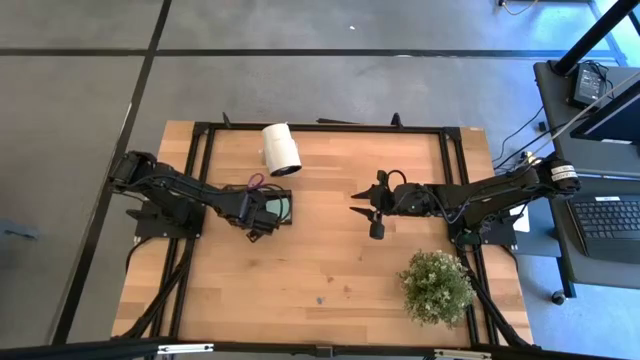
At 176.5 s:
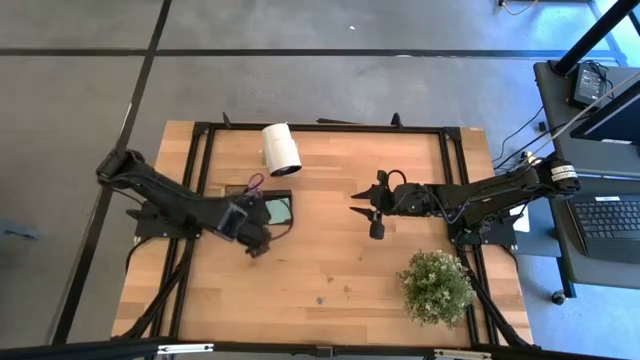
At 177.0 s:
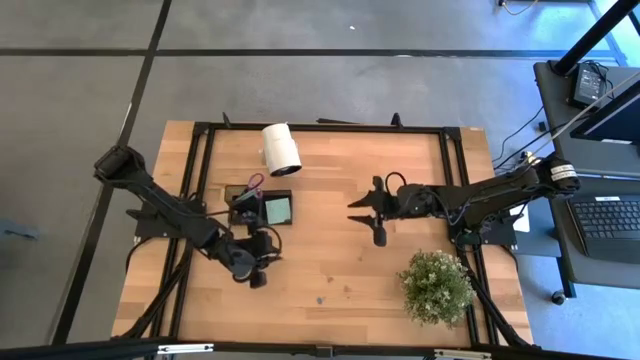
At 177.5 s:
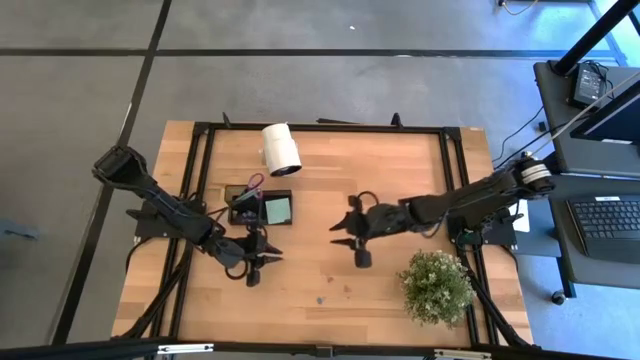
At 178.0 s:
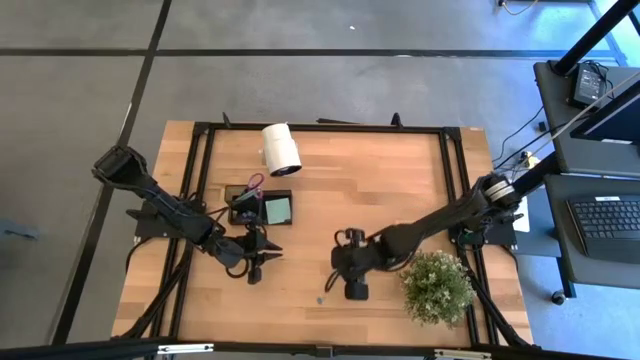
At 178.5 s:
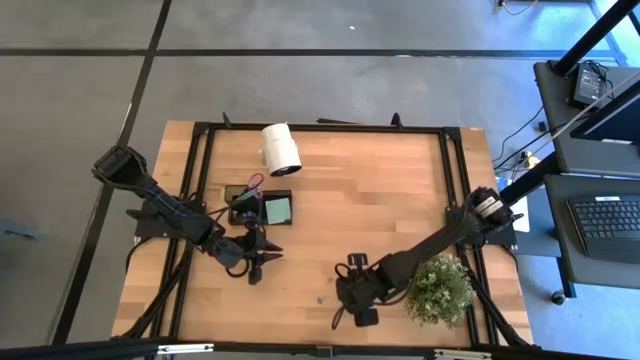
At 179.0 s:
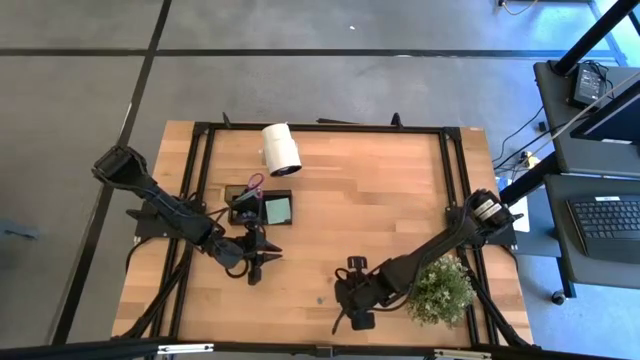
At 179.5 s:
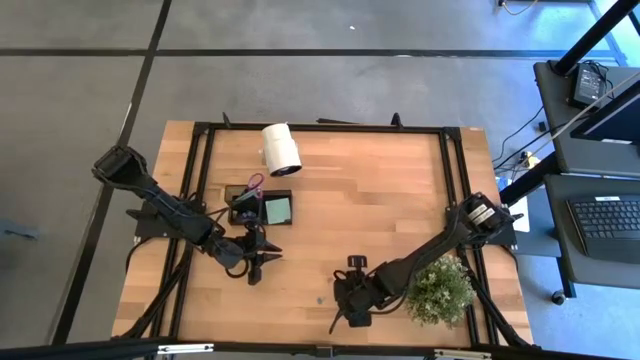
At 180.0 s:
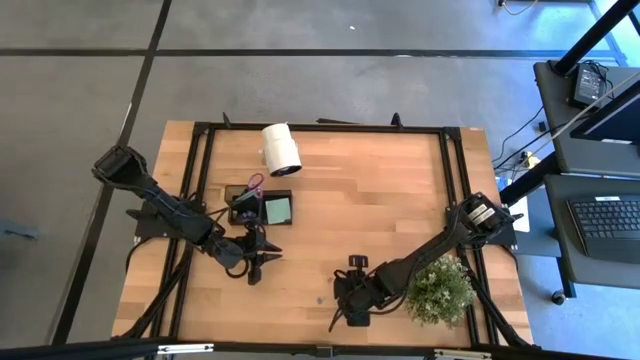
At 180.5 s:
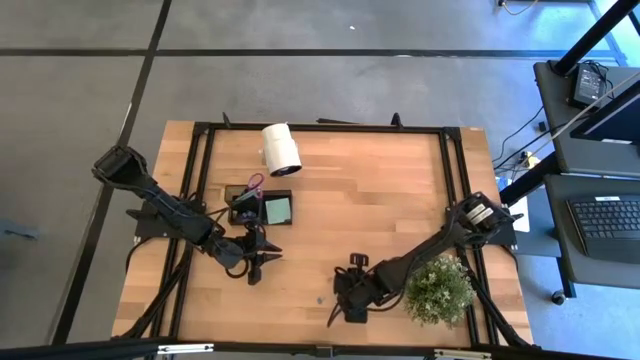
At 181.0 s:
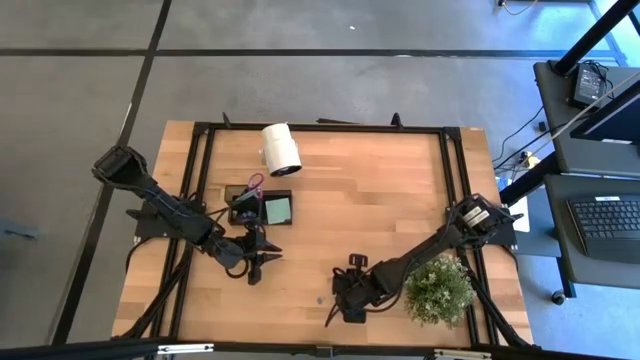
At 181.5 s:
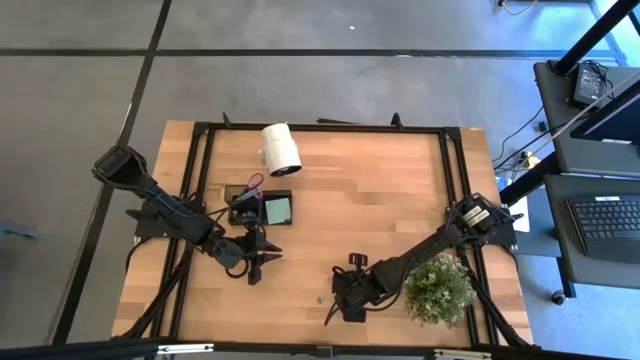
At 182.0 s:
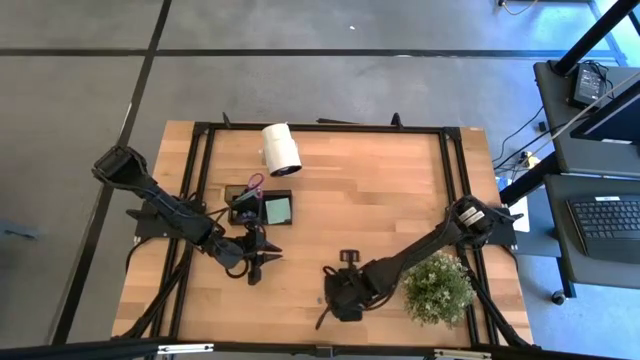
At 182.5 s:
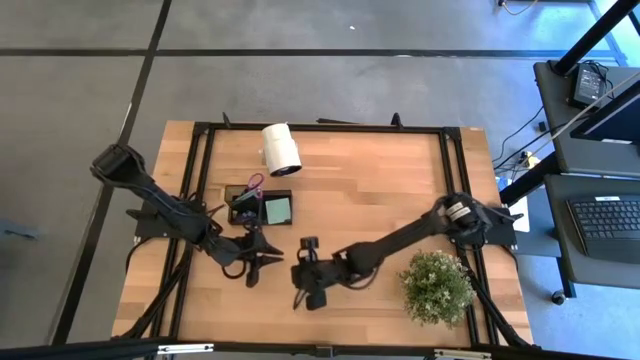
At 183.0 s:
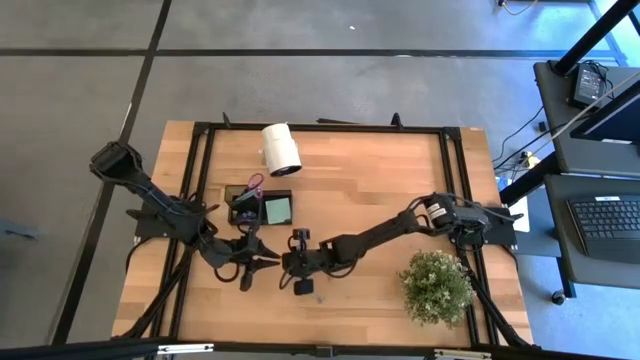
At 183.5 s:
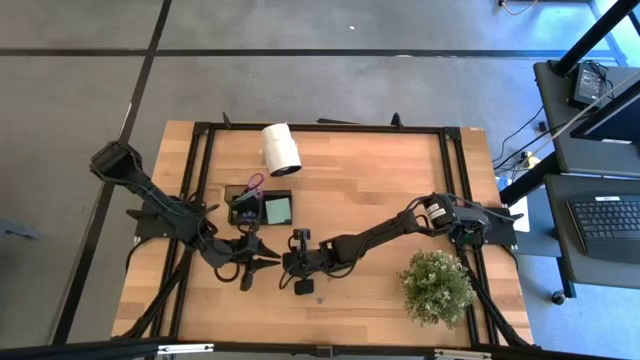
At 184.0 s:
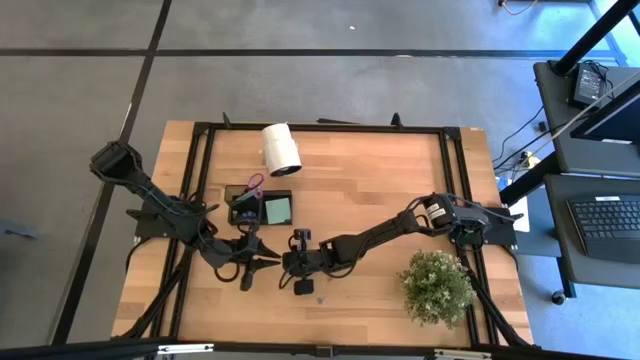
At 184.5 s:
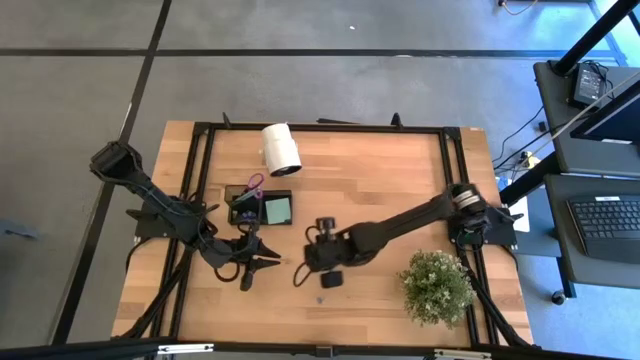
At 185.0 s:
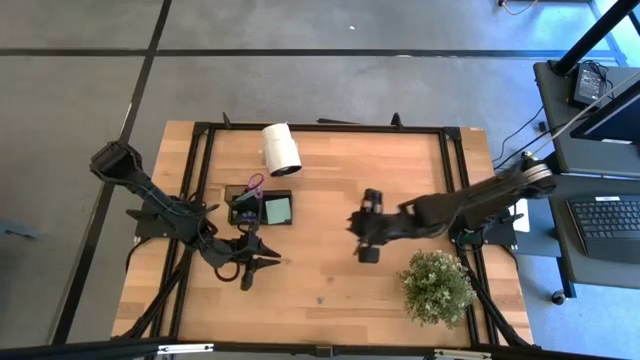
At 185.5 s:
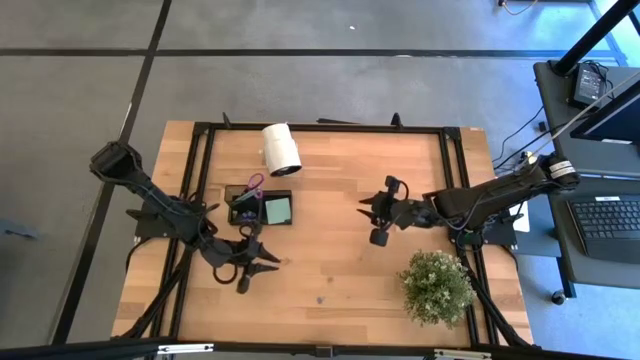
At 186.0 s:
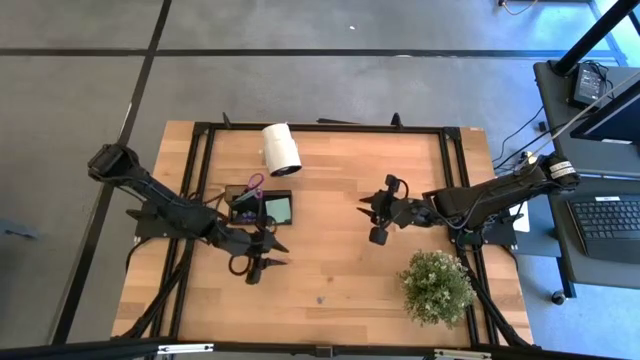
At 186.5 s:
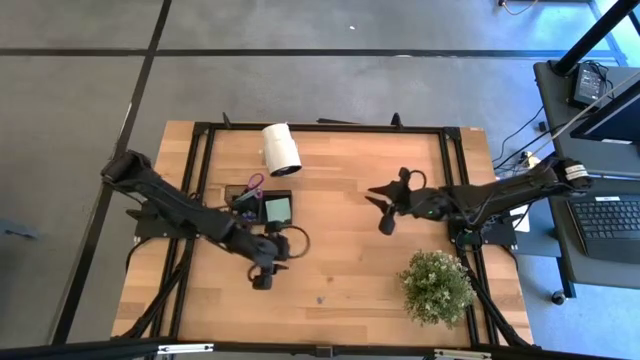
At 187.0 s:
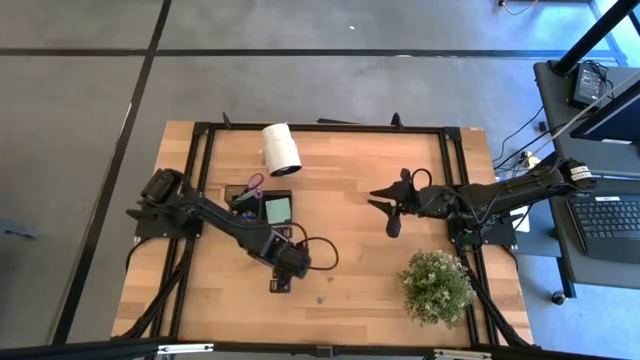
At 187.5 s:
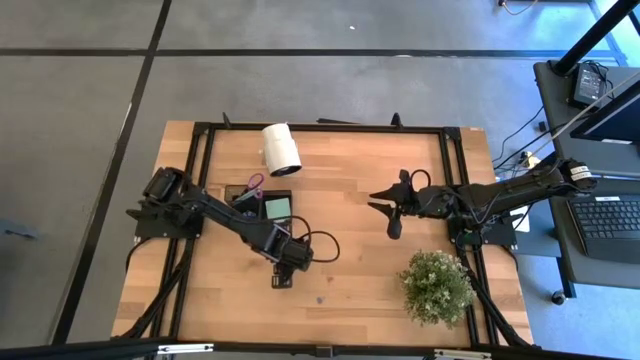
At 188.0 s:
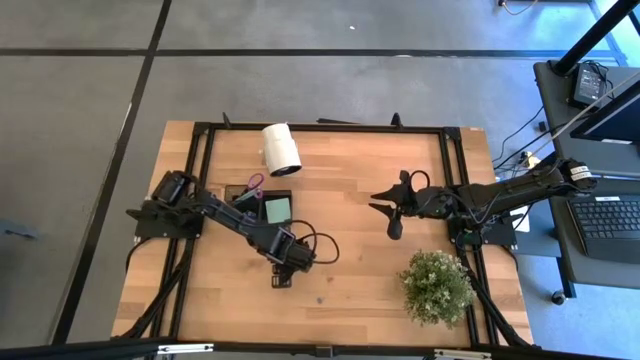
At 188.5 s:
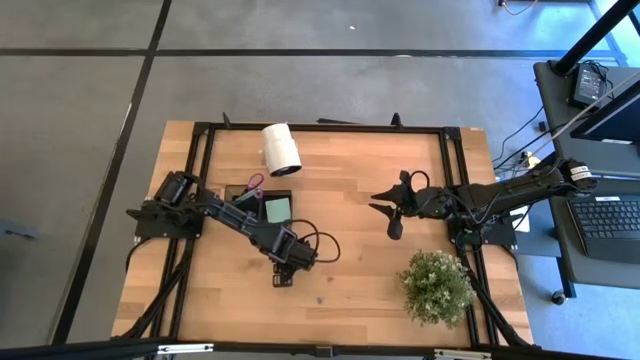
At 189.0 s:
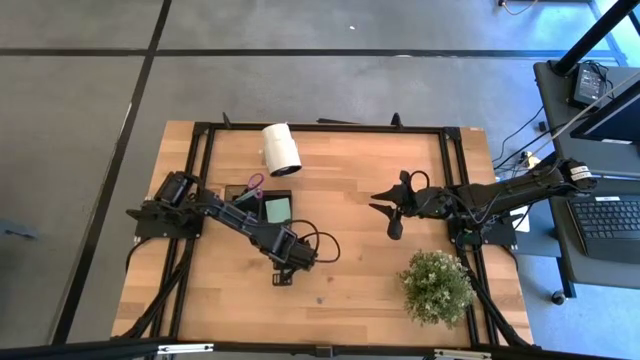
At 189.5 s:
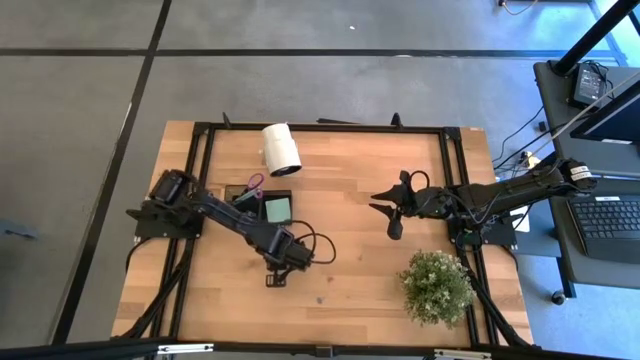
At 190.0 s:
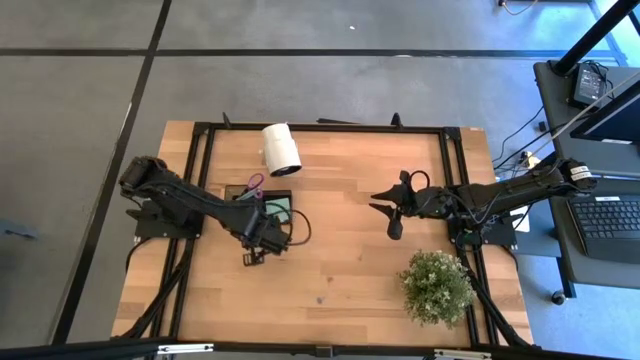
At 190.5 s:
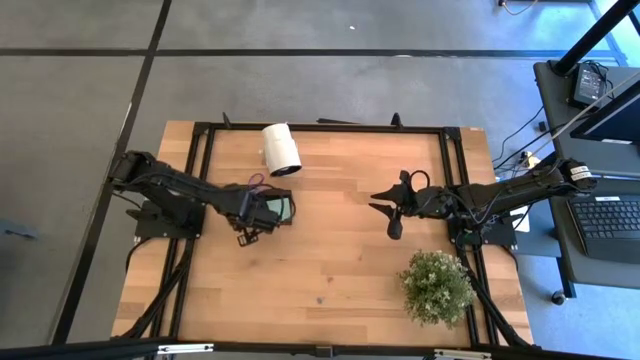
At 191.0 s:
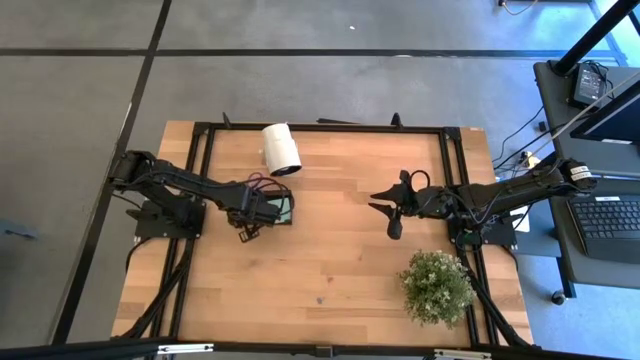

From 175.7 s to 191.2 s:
Task: Pick and place office supplies into organizer
Put the pink binder clip into the black desk organizer

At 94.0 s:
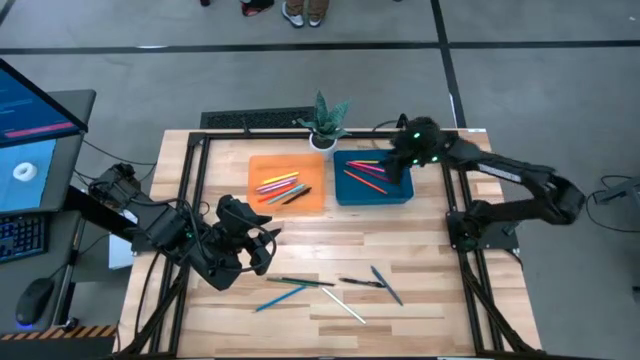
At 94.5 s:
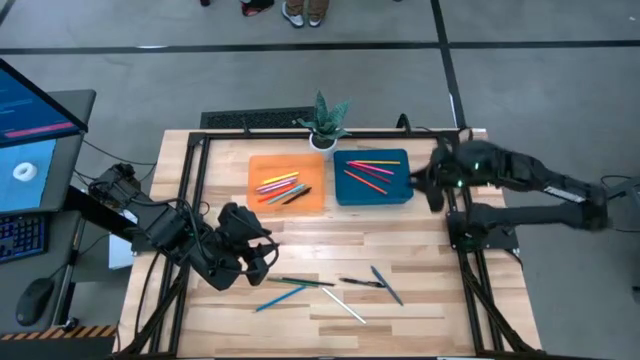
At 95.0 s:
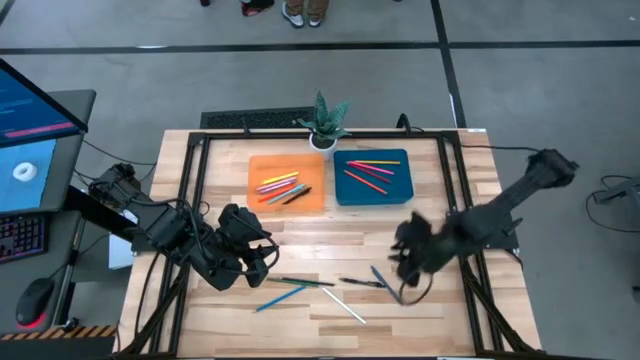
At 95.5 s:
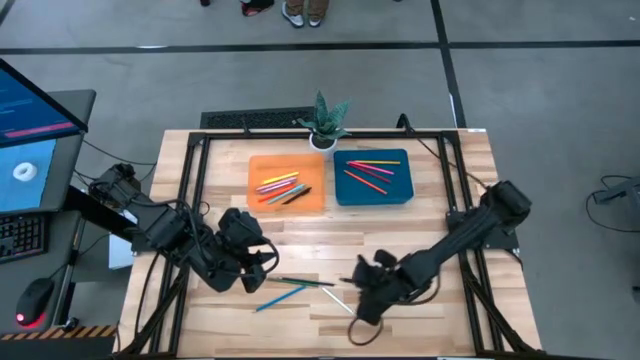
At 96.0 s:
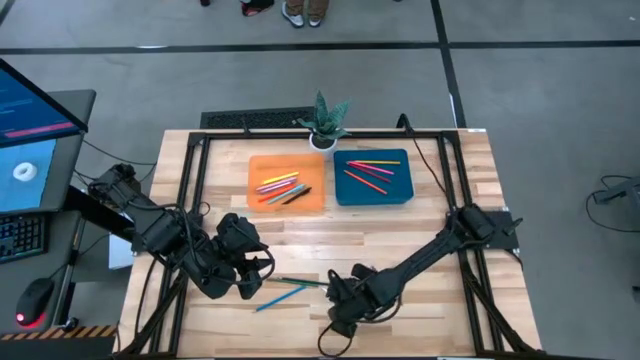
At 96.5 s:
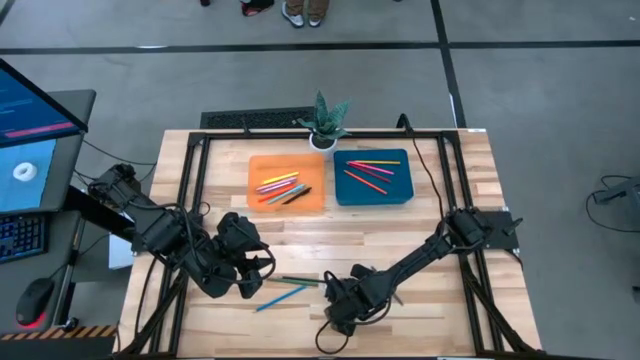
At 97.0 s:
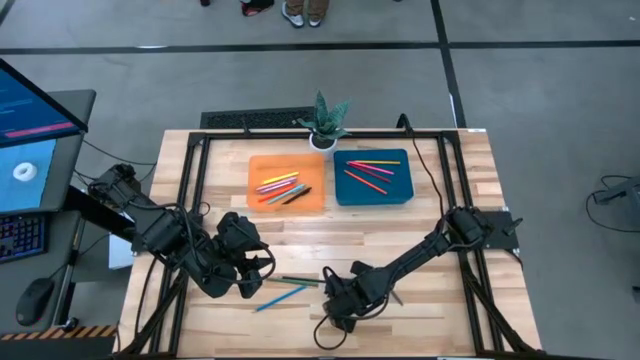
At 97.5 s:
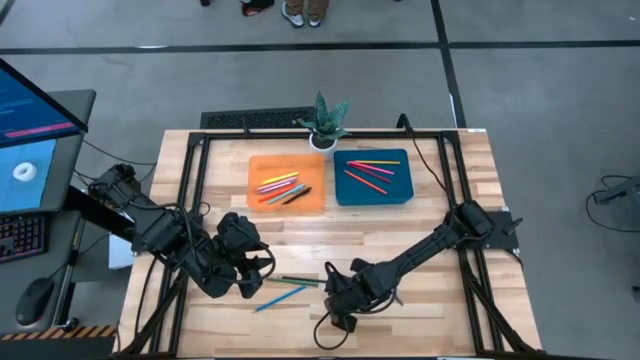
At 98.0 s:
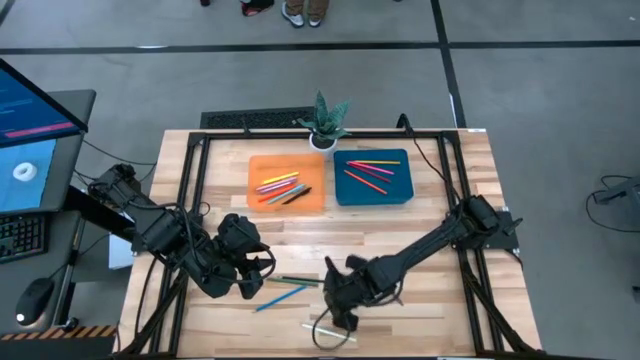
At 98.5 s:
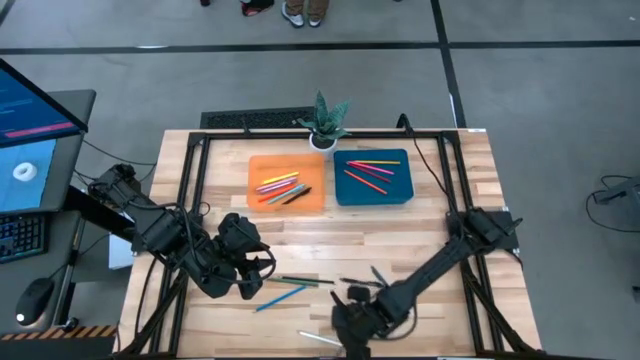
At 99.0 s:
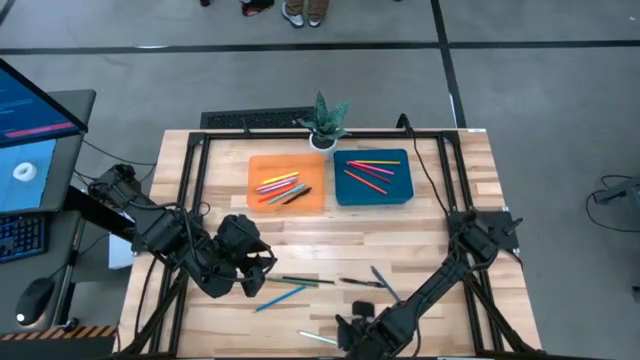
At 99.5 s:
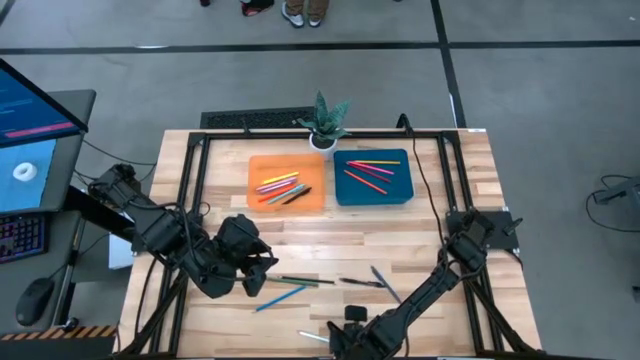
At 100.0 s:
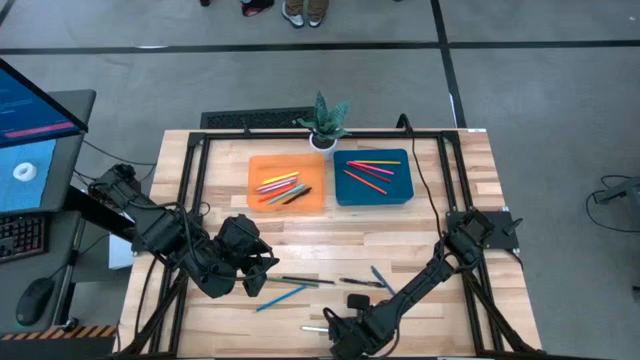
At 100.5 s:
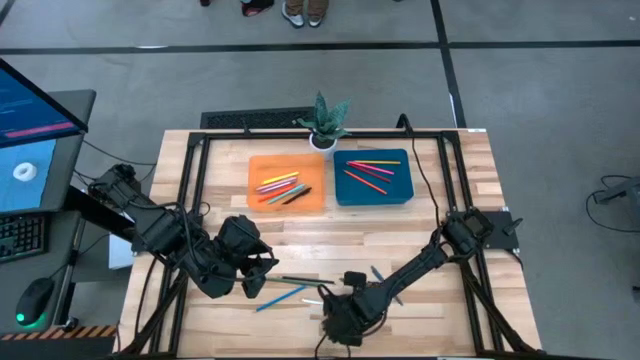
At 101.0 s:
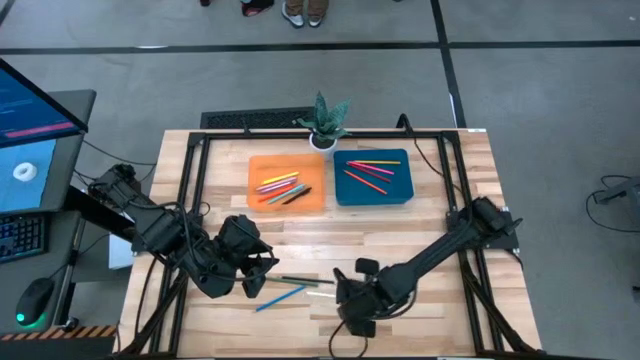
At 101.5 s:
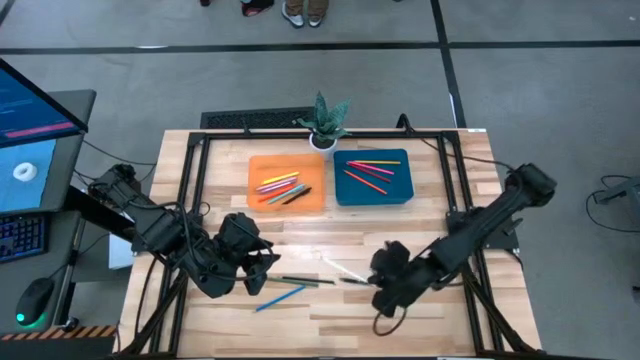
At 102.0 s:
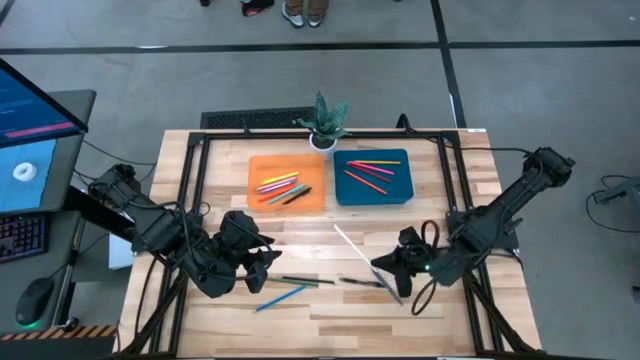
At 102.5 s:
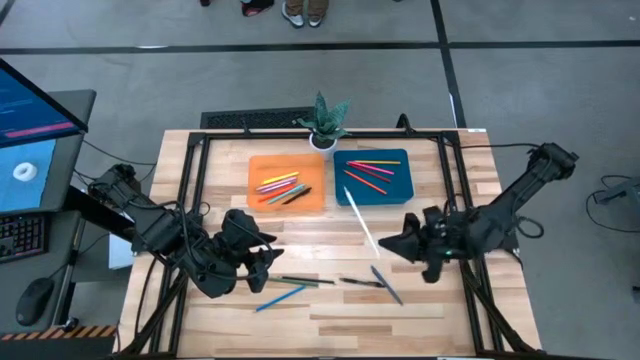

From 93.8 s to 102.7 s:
Task: Sort pens & pencils
Put the white pencil into the blue bin
